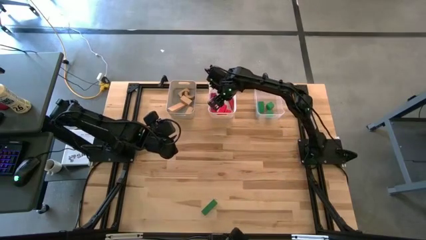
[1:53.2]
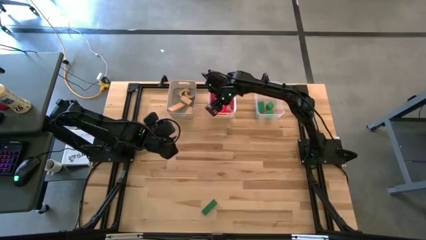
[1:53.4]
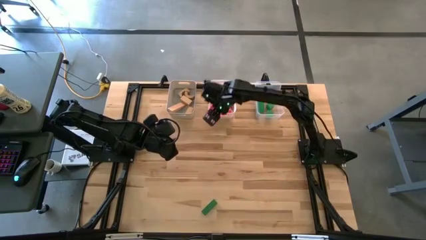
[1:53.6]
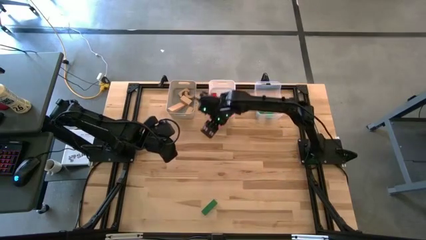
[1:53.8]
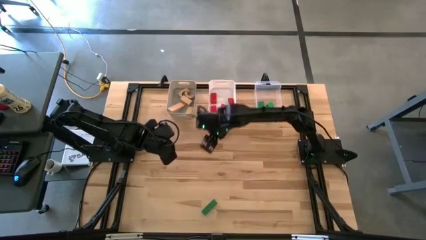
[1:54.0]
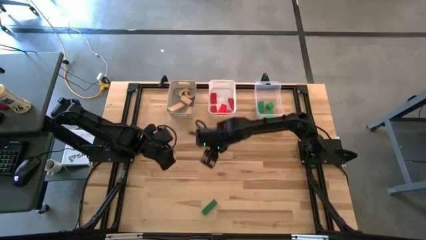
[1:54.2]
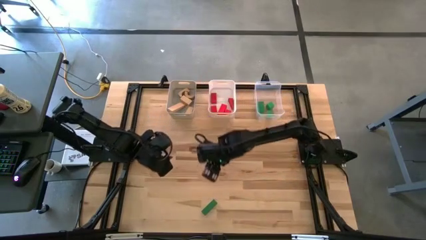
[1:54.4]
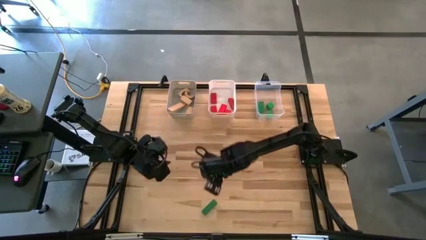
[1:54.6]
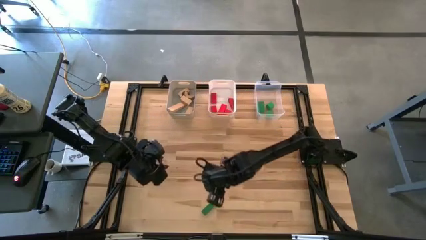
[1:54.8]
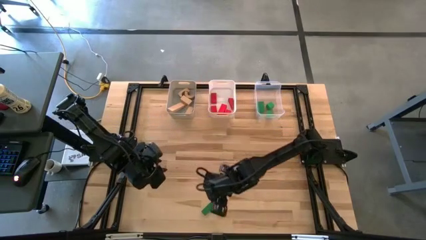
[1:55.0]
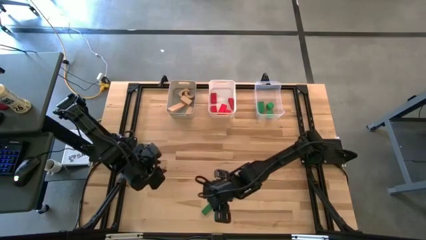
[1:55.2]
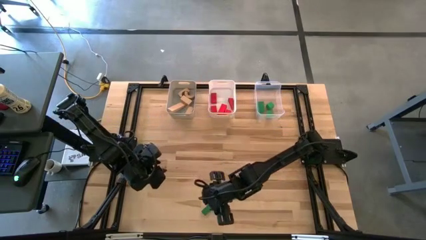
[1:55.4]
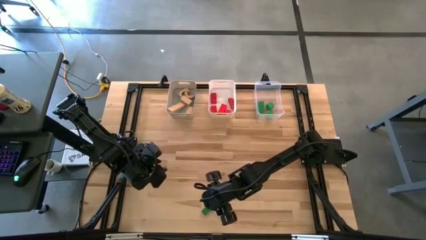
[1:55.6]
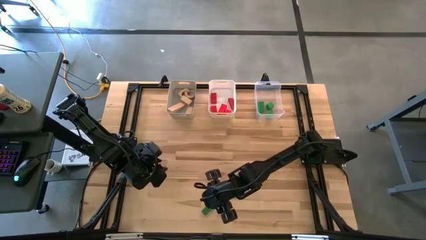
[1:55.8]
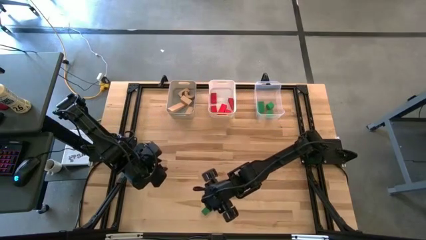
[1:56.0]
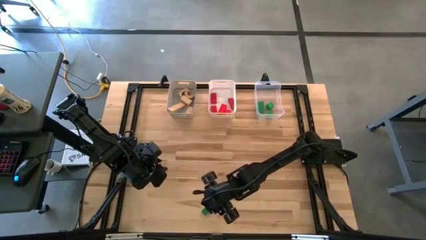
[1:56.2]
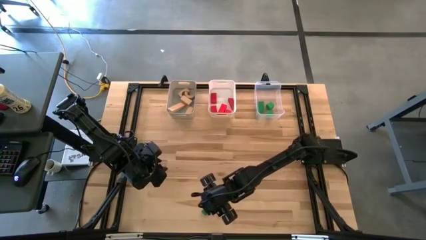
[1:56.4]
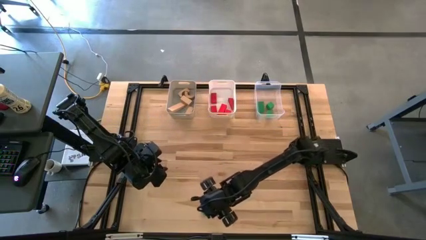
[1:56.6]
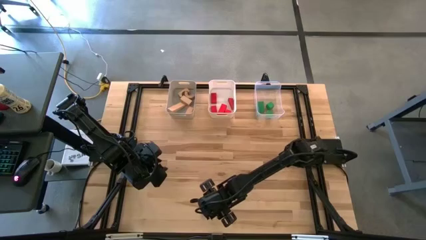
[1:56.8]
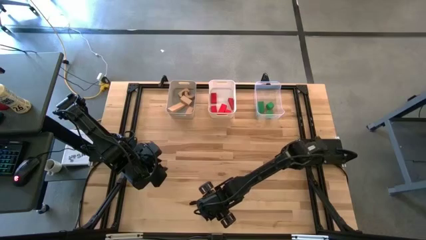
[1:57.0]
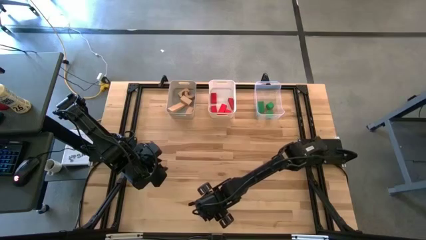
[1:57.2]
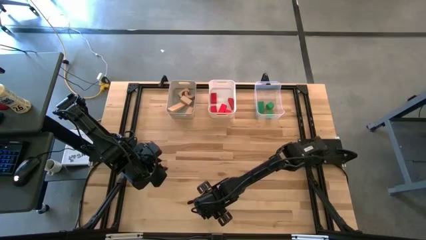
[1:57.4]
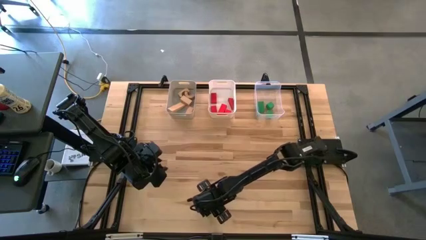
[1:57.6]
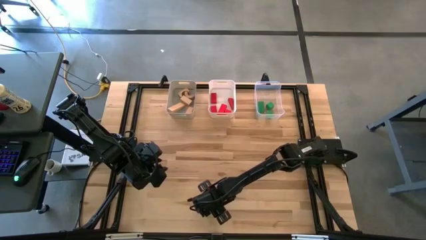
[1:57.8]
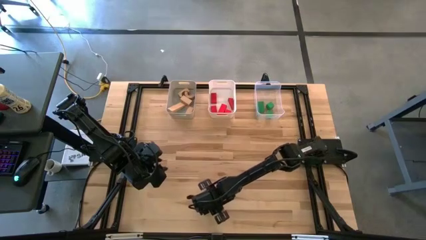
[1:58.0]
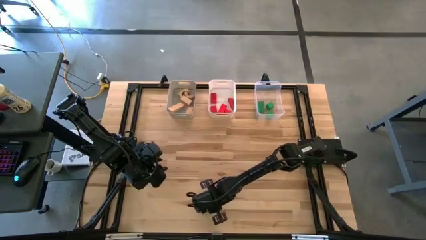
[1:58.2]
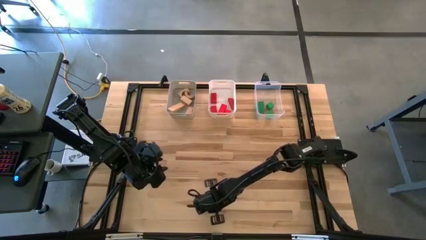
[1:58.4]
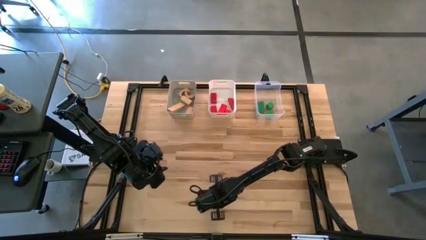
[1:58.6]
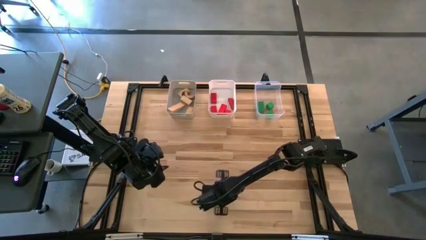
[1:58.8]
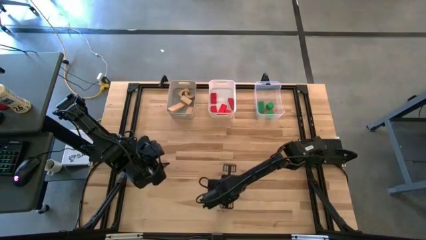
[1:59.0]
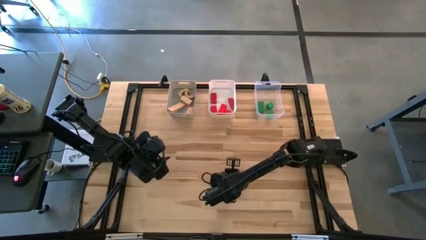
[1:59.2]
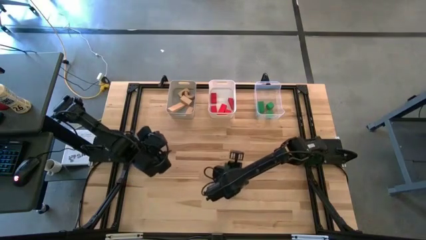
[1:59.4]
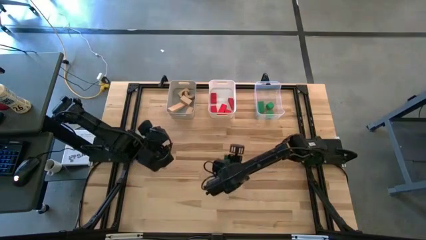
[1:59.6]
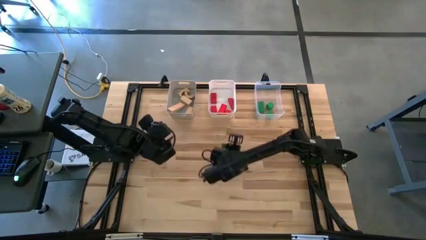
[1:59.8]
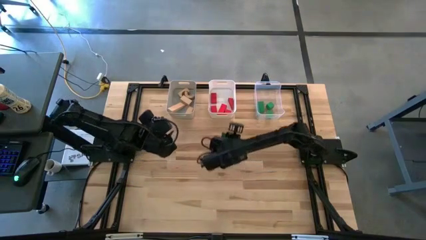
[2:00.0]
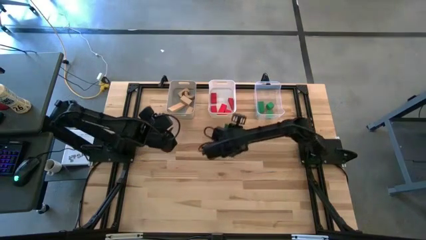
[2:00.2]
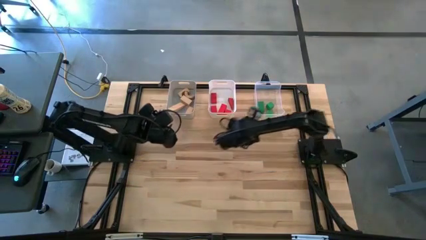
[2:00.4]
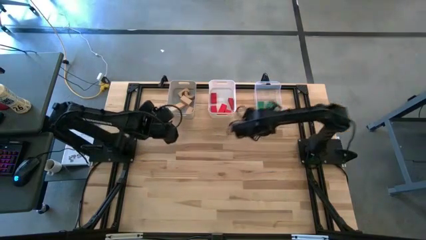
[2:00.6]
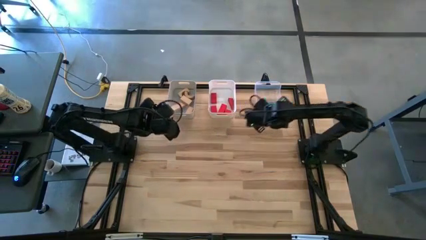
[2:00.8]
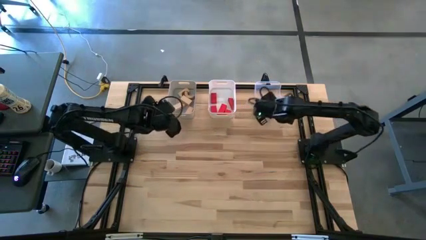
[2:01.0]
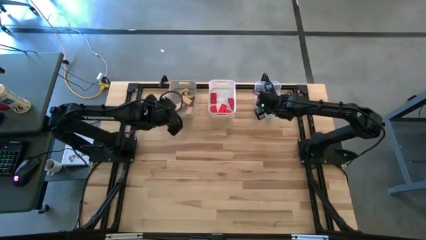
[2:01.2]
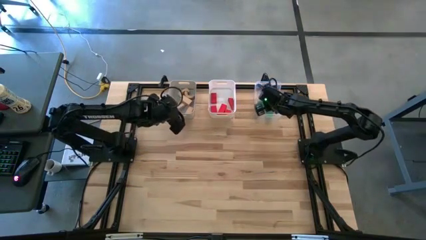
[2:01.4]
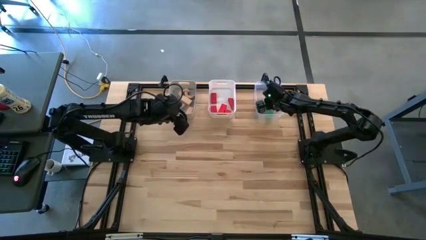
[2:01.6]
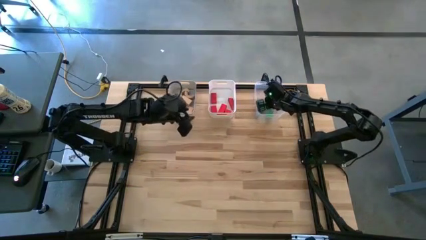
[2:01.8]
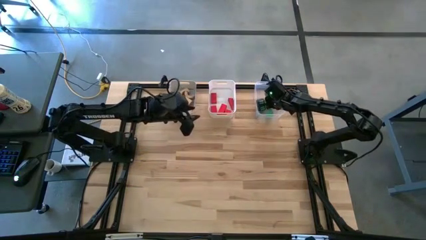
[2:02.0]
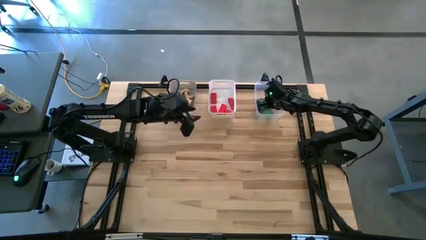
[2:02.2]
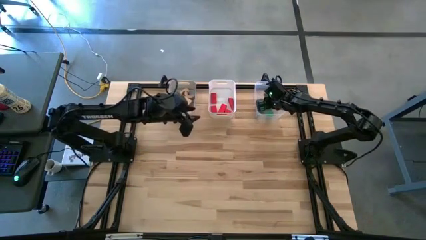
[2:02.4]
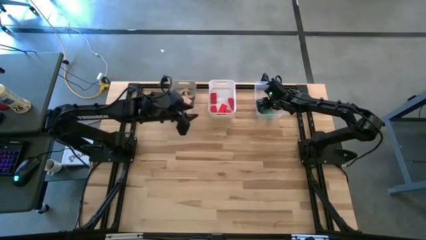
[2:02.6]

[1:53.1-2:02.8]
Task: Sort & place blocks by color
Put the green block into the transparent bin

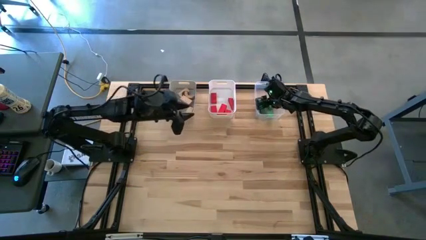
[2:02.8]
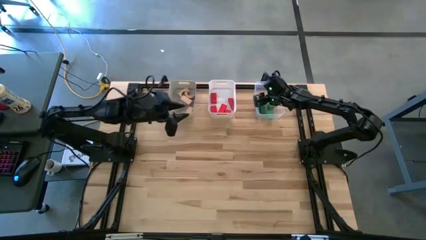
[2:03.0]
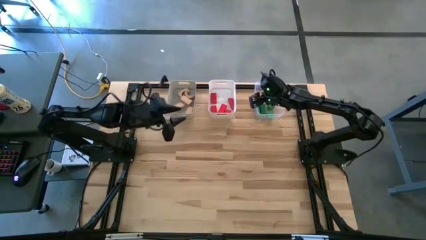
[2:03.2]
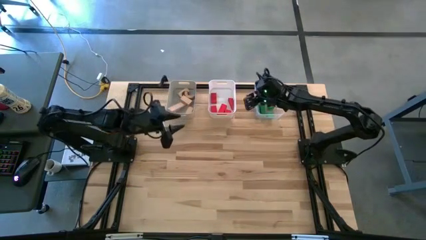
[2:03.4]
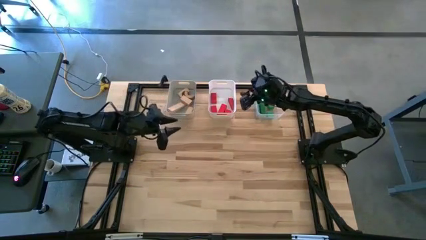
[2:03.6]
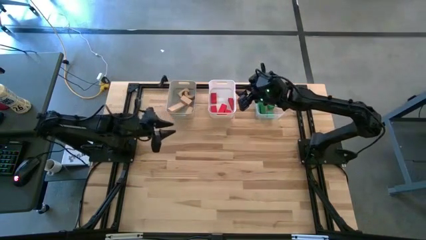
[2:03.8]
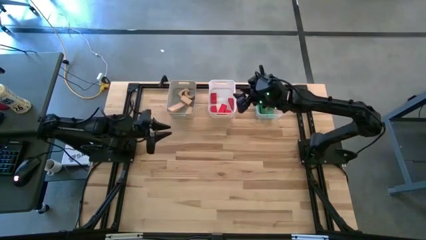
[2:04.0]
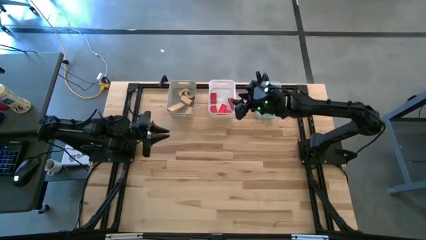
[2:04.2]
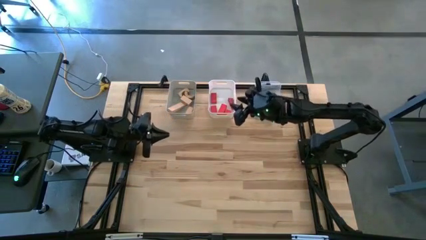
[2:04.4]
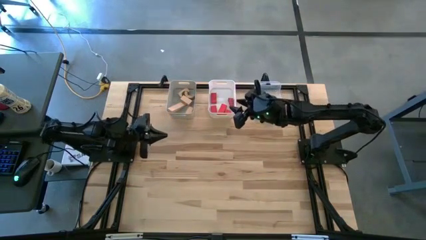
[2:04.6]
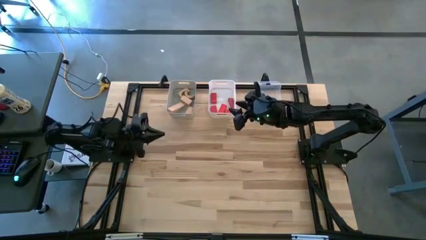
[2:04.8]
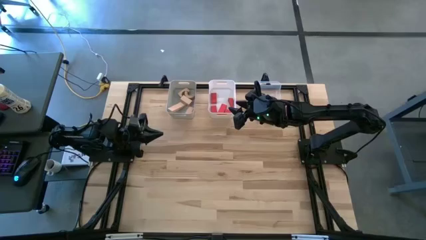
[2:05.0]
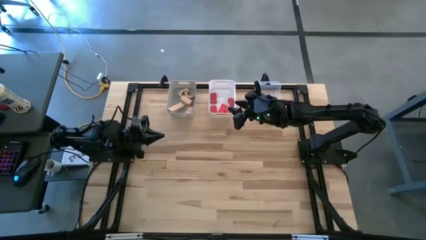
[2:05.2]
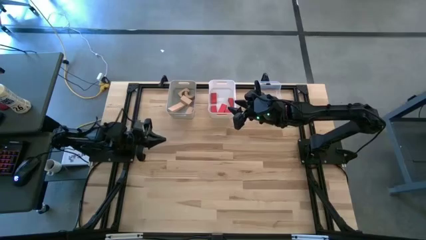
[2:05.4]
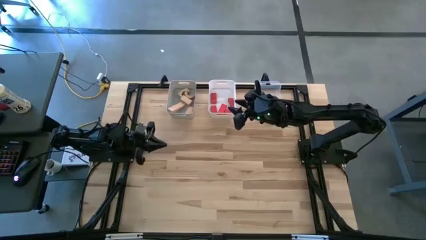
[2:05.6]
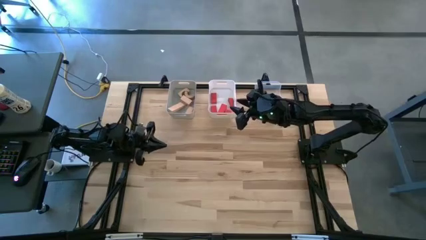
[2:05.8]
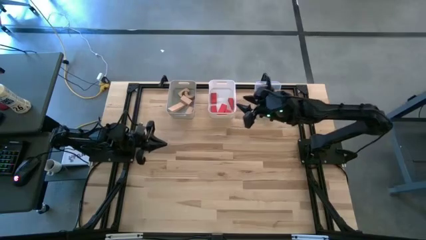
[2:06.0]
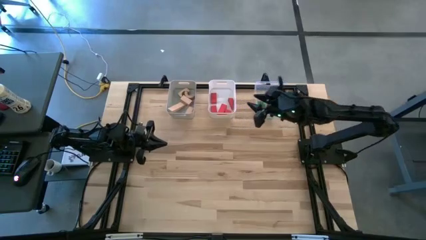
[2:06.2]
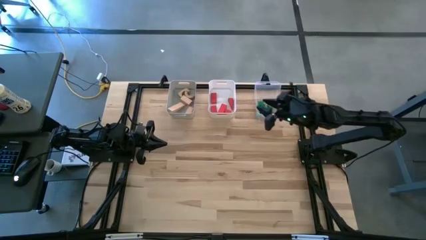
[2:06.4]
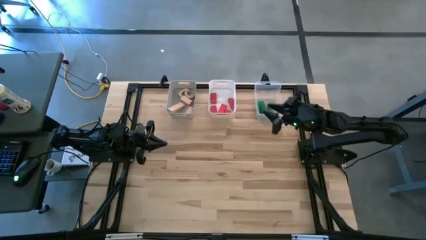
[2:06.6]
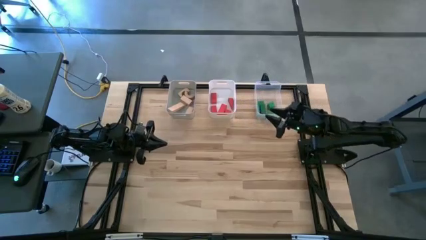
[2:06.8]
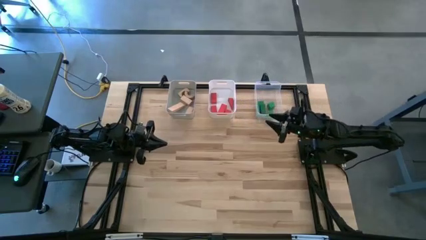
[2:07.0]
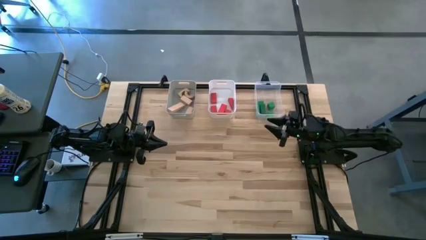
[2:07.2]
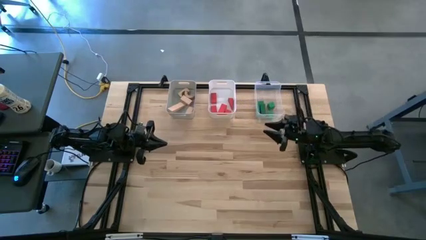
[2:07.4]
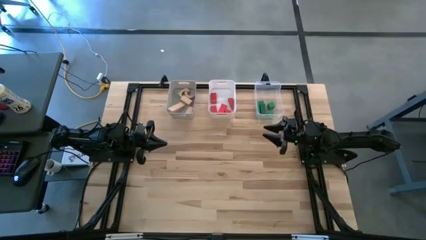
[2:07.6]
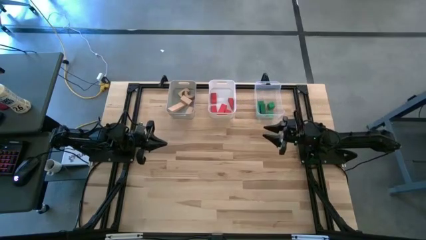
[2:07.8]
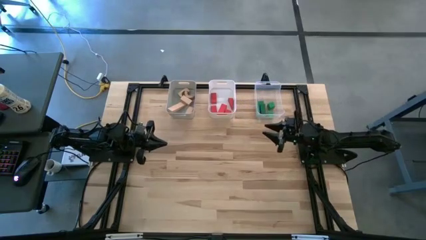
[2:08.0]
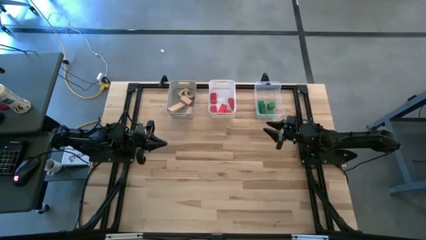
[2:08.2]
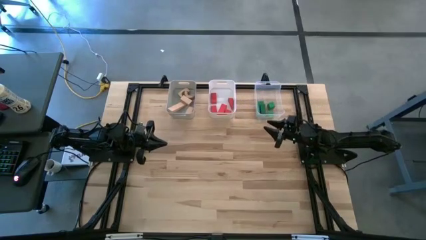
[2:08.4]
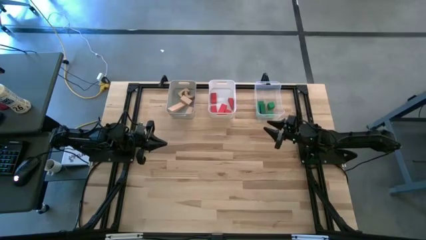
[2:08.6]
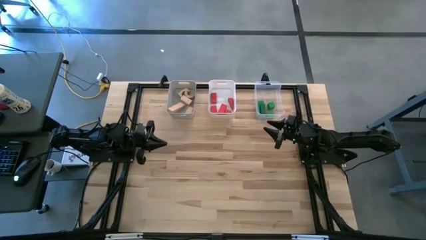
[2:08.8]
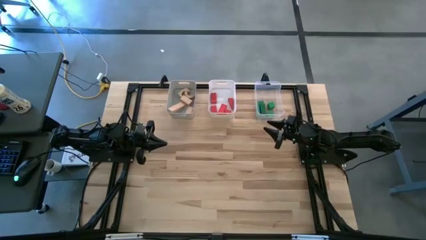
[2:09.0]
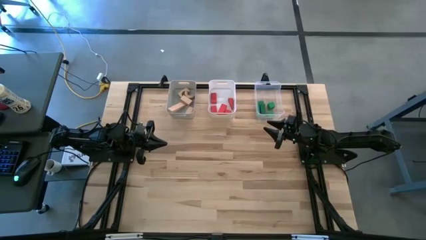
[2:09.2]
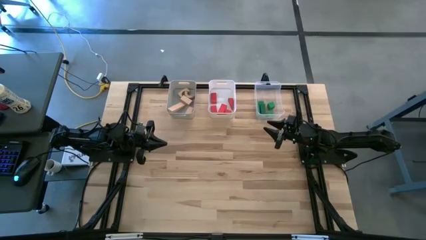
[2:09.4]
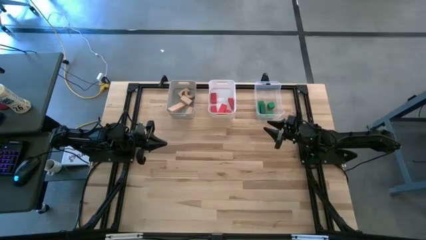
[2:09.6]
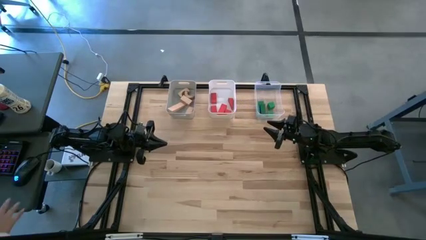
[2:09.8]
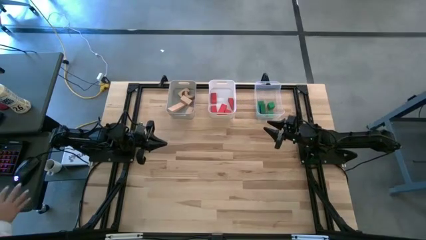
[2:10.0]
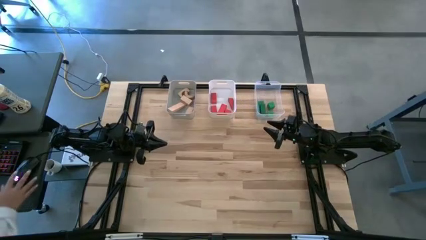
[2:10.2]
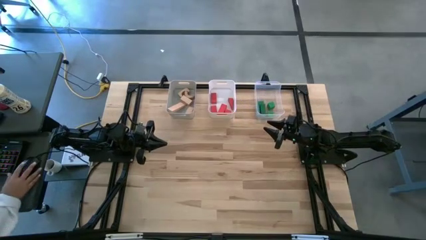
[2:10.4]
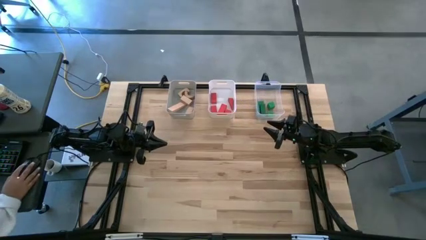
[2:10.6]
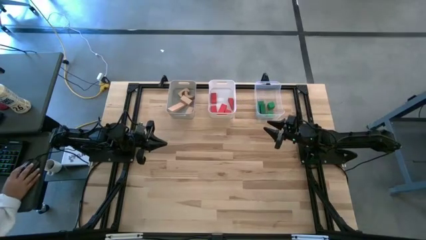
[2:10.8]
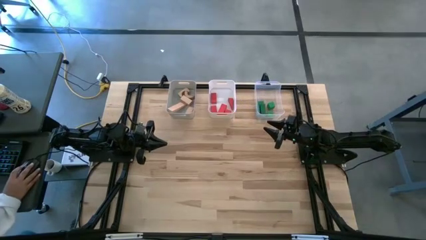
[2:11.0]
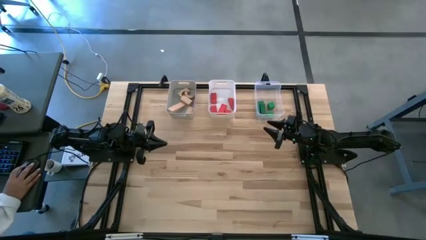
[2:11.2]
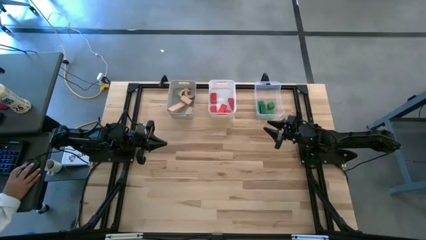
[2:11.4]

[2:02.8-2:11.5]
Return to Home Position
